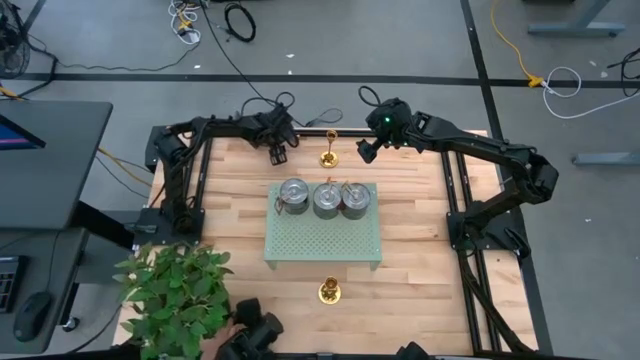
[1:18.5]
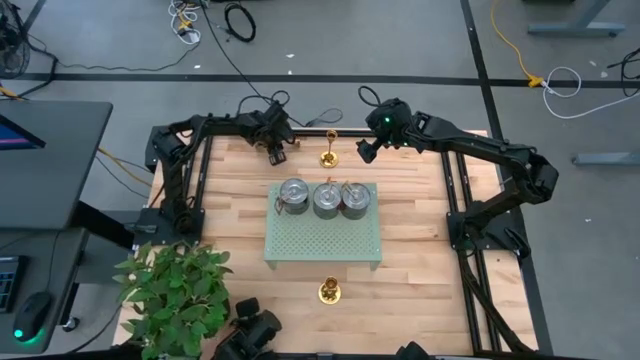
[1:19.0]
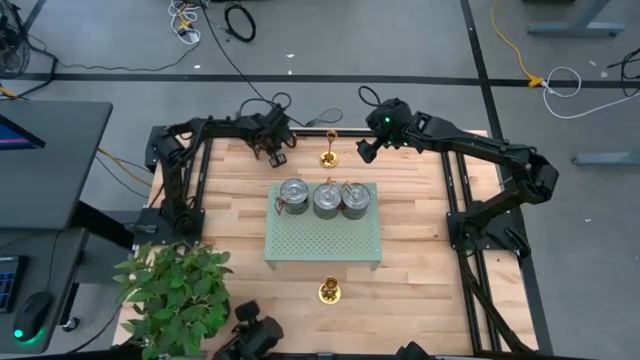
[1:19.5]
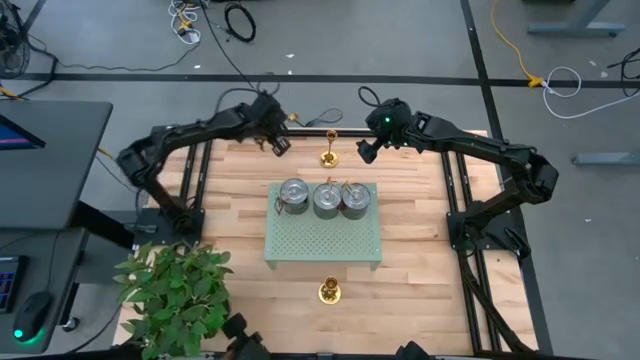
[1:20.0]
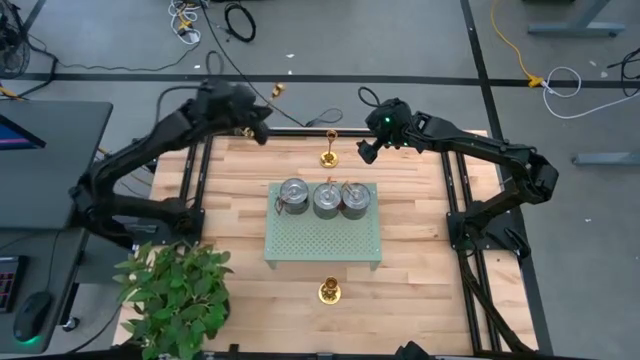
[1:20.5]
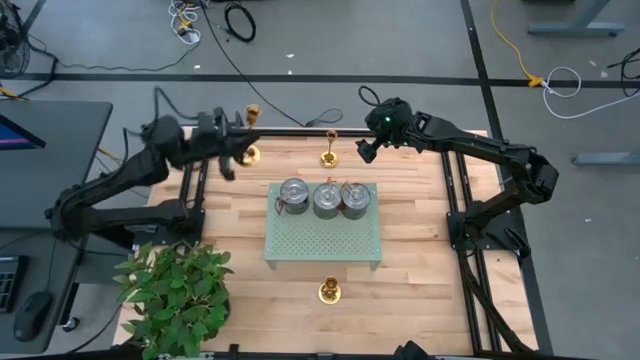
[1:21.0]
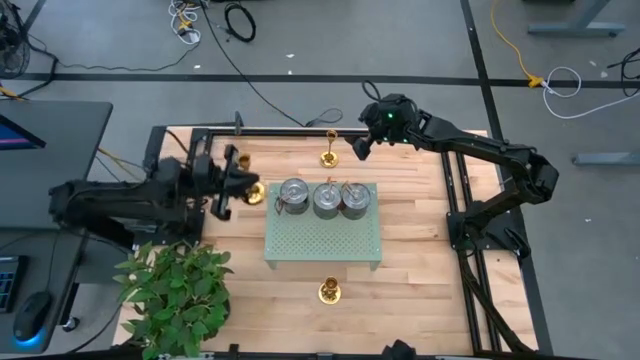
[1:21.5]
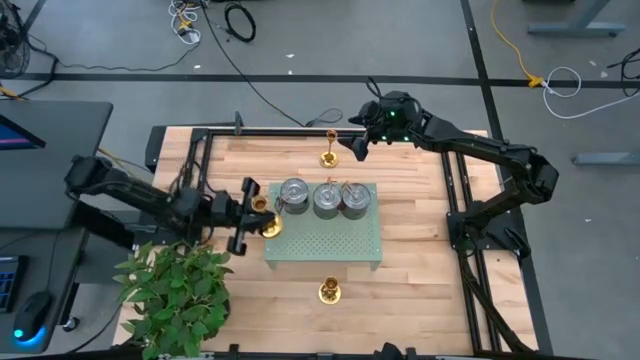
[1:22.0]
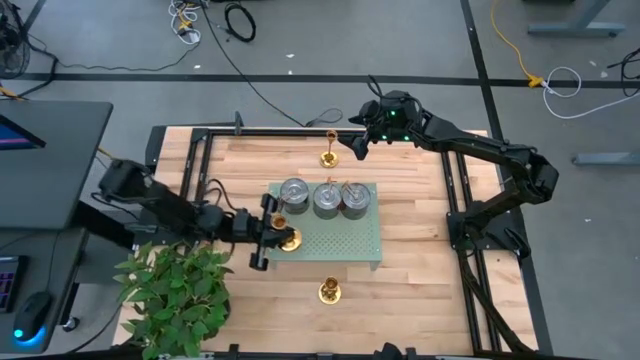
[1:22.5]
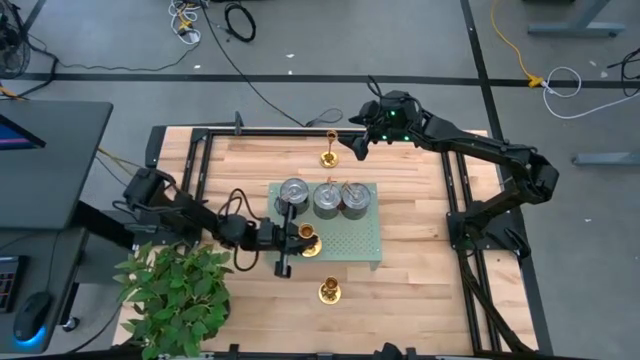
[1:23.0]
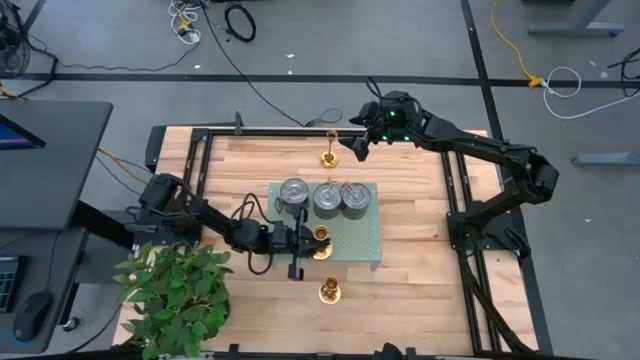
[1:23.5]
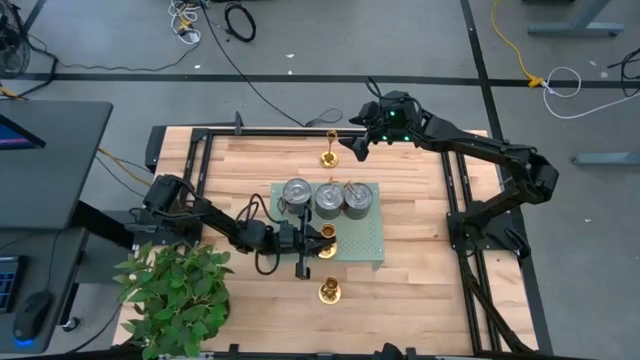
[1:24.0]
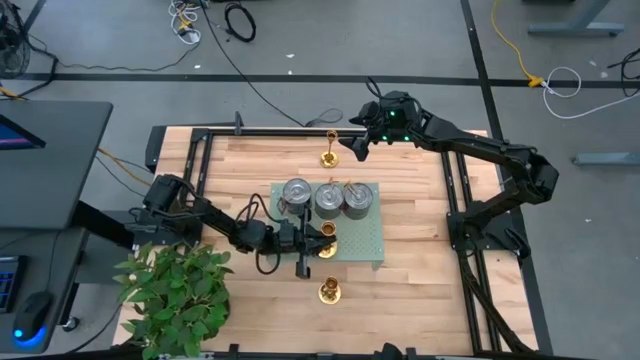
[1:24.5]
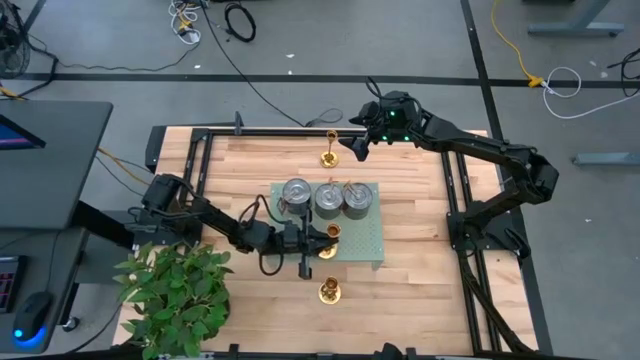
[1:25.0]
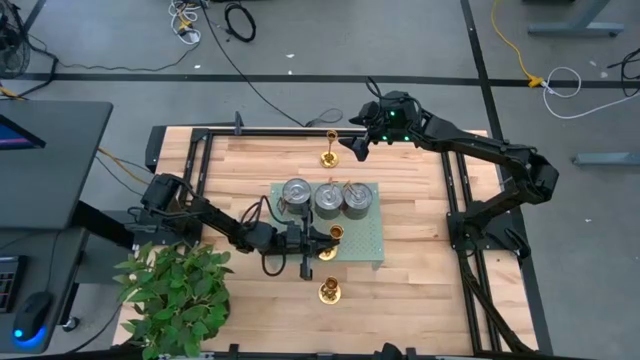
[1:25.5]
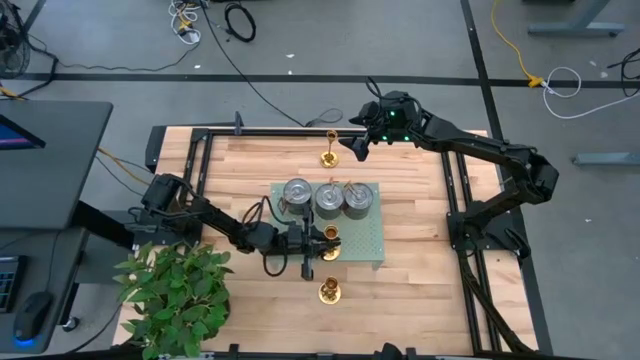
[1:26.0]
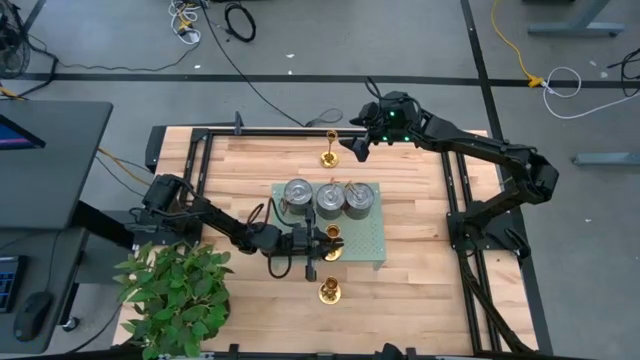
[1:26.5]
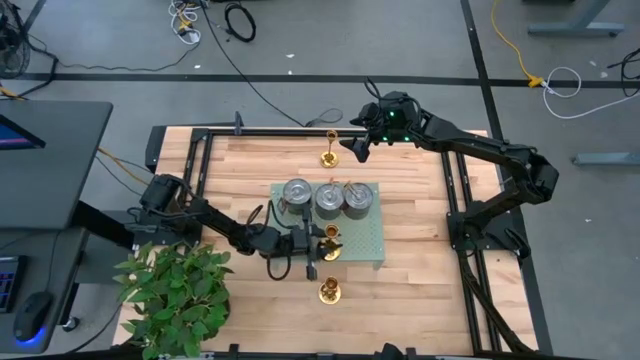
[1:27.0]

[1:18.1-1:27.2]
Task: Pick & Place candle stick holders
Put the top golden candle holder on the shelf aligned with the middle orange scented candle

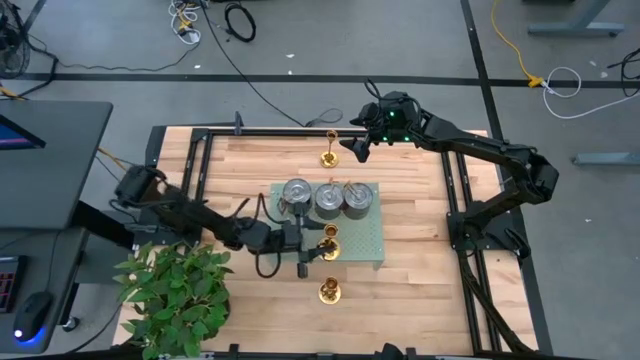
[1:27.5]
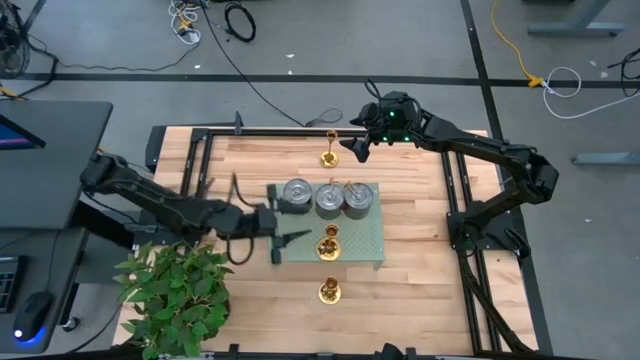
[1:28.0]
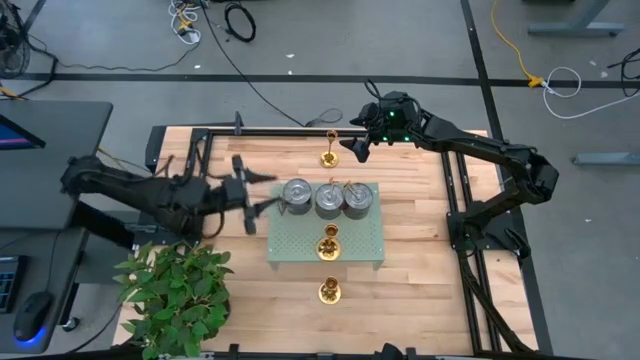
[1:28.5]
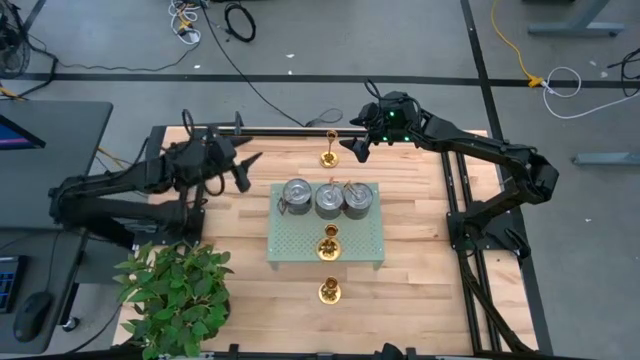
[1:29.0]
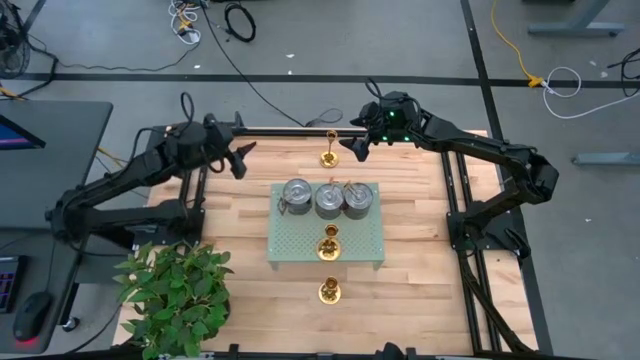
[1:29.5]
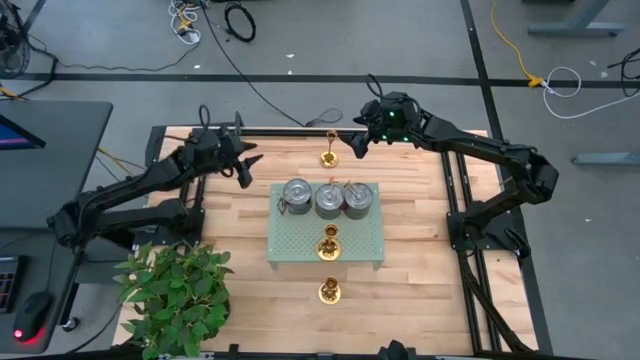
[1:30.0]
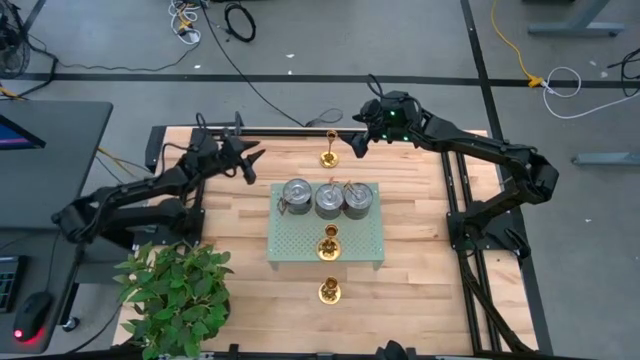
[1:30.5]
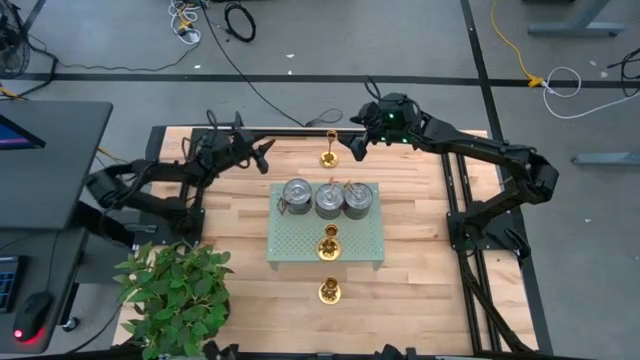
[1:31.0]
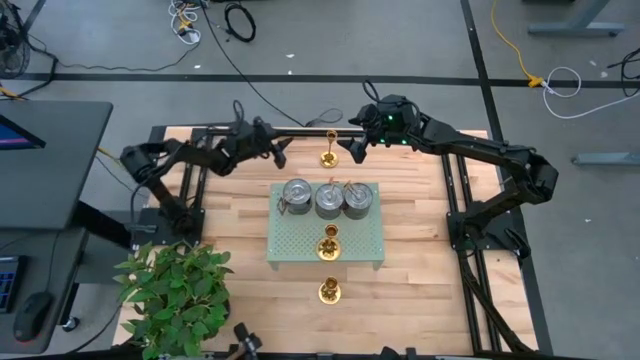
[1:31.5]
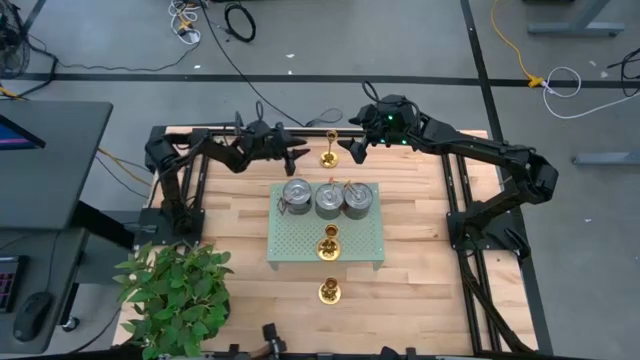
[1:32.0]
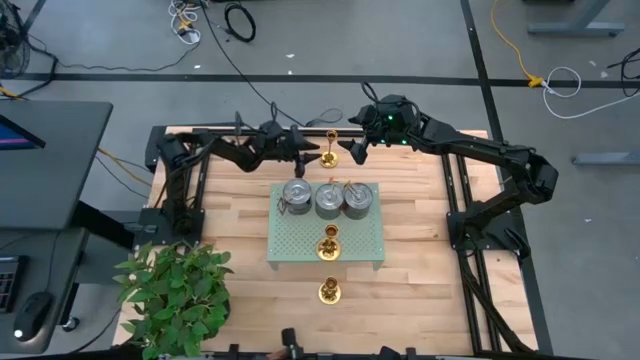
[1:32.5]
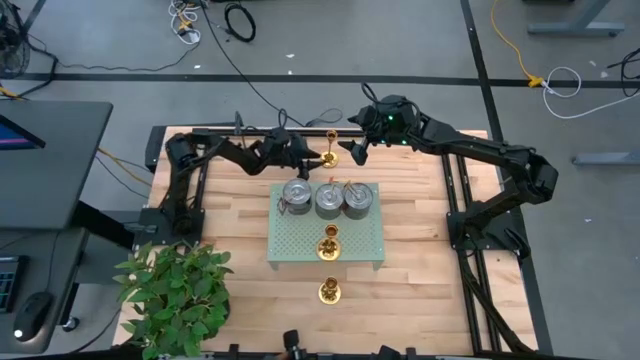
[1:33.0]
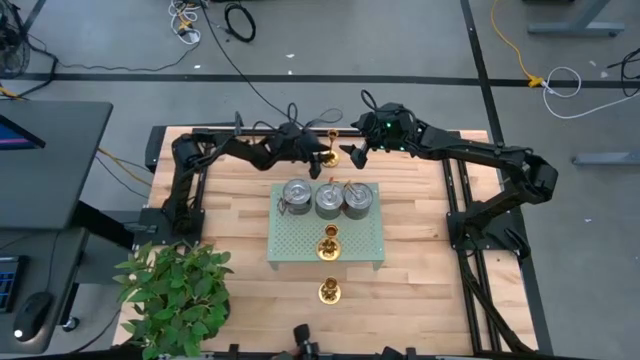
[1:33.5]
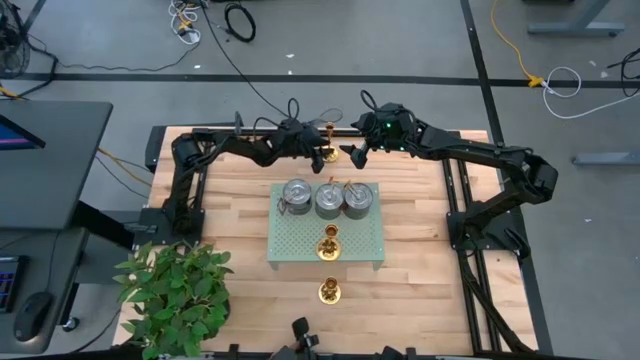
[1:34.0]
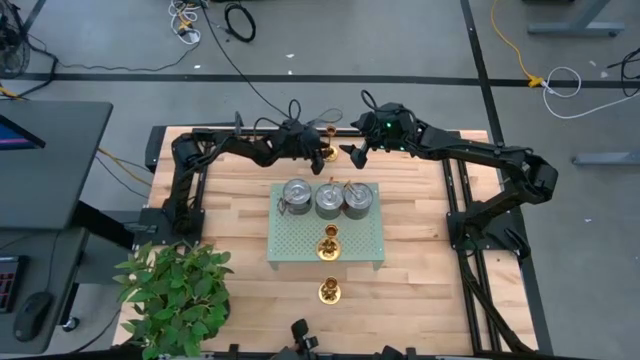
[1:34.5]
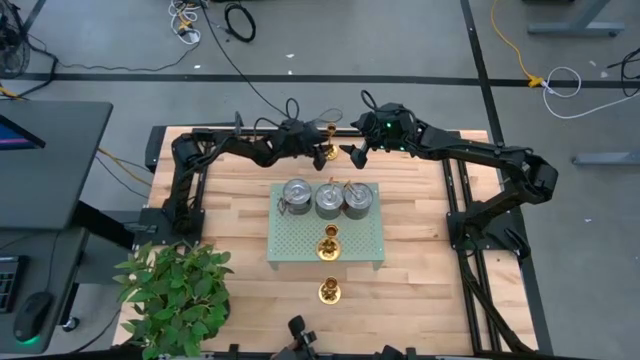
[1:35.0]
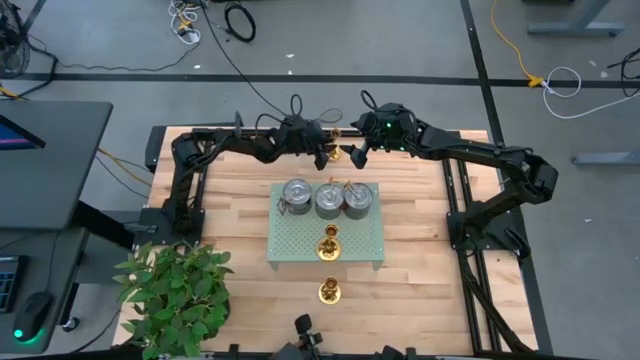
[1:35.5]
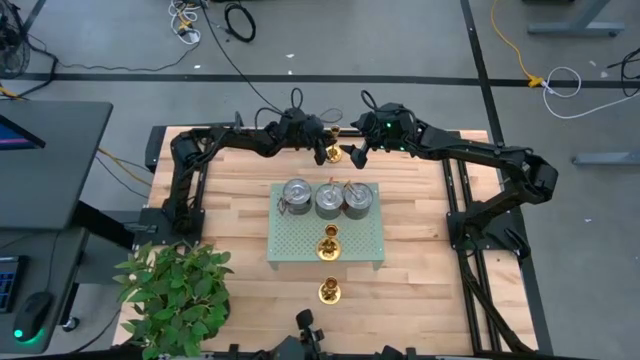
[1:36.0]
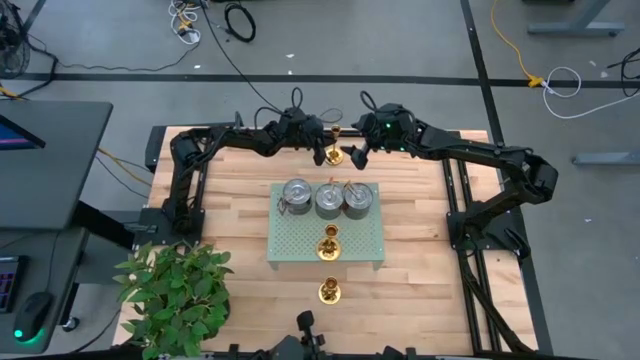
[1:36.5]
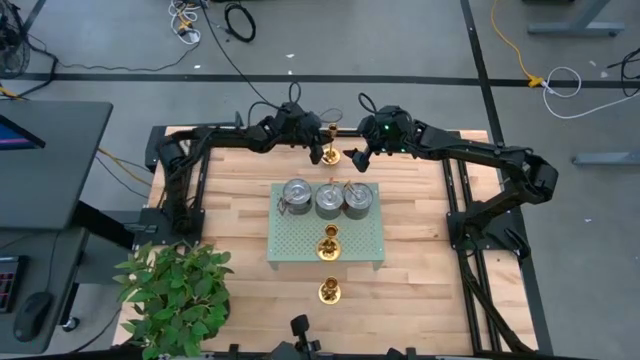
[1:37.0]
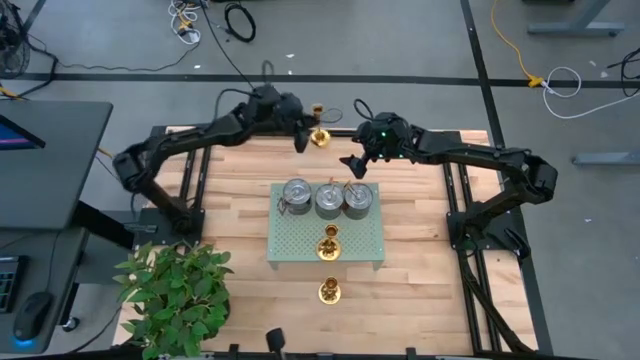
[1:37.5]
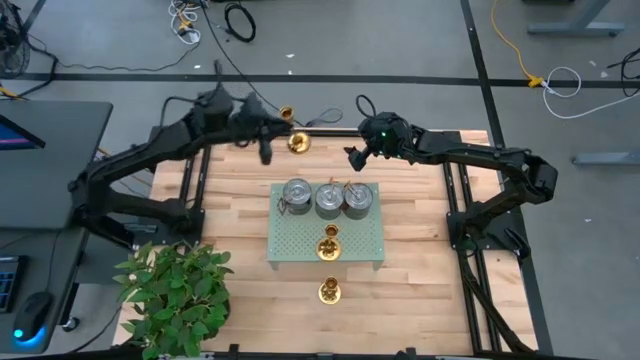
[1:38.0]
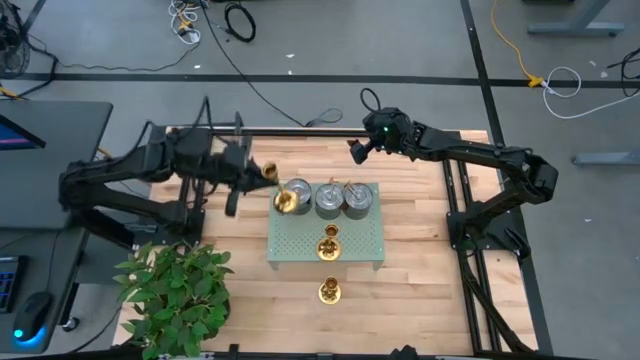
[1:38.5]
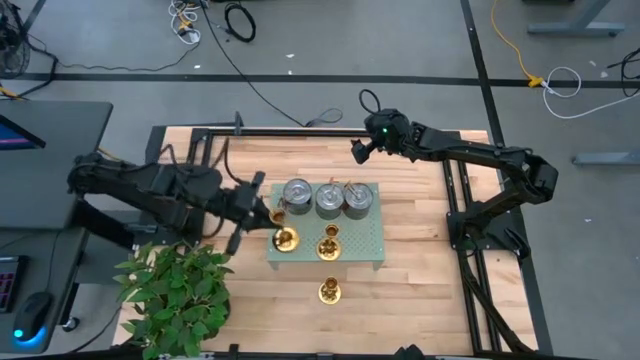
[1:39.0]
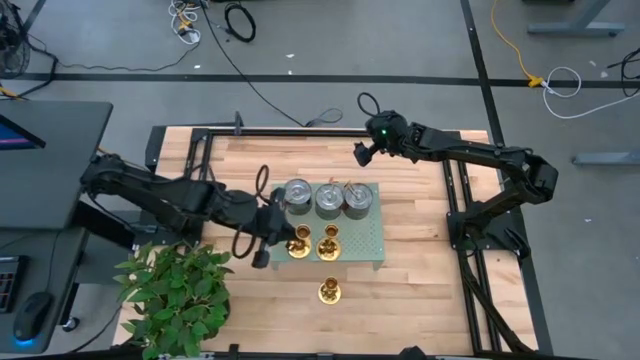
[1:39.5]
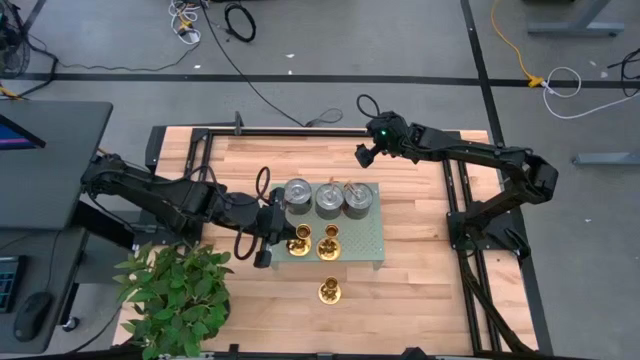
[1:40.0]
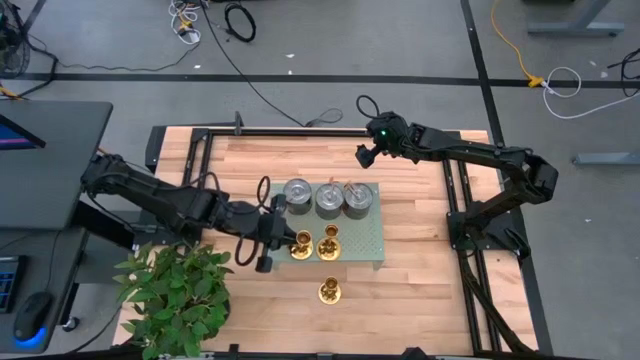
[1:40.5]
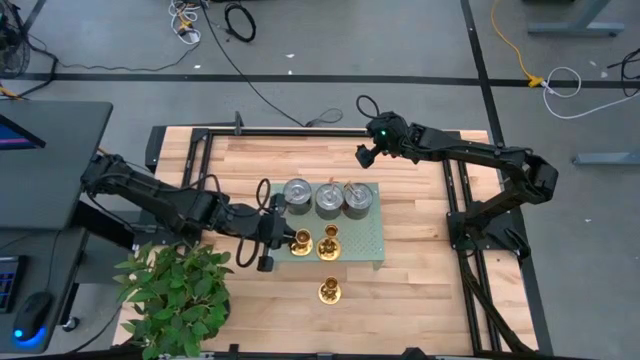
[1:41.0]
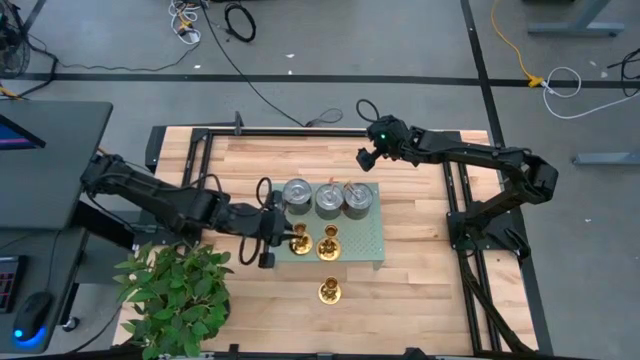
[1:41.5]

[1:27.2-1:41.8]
Put the top golden candle holder on the shelf aligned with the left orange scented candle
